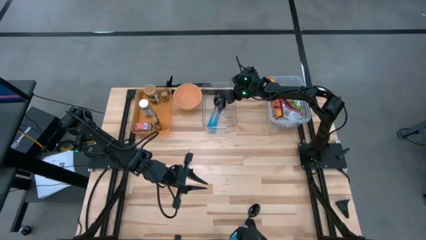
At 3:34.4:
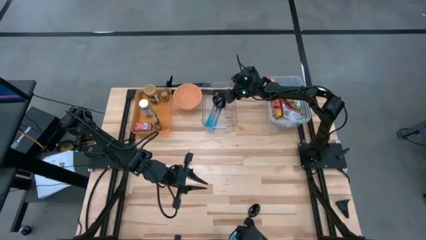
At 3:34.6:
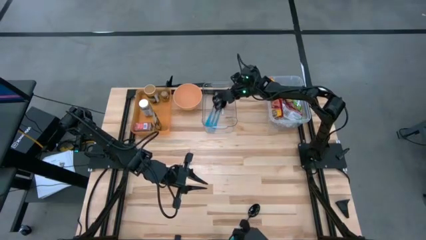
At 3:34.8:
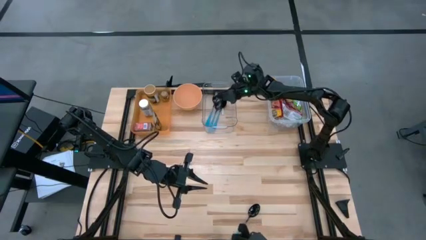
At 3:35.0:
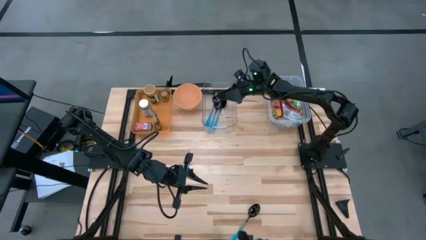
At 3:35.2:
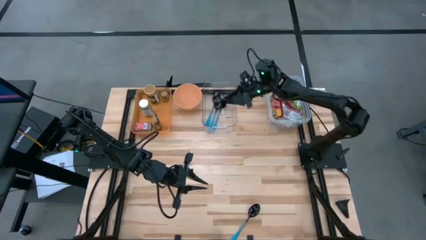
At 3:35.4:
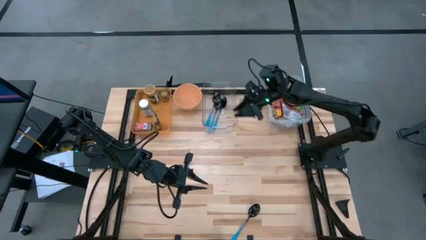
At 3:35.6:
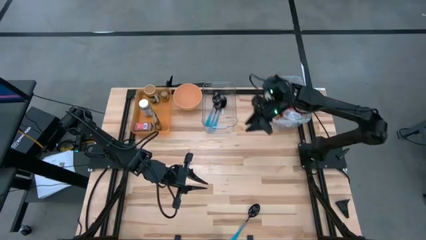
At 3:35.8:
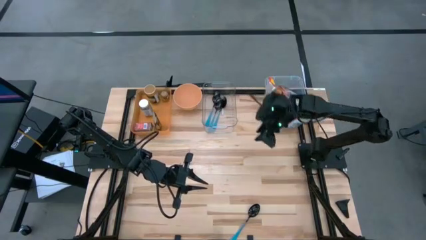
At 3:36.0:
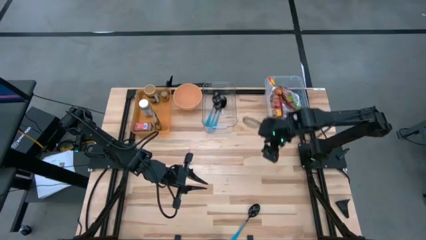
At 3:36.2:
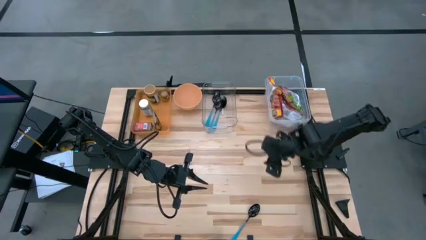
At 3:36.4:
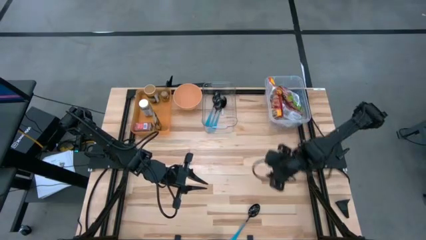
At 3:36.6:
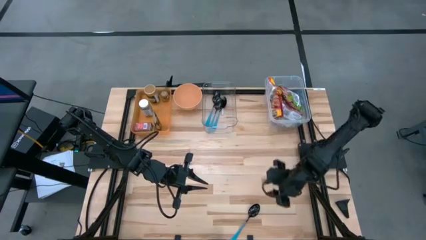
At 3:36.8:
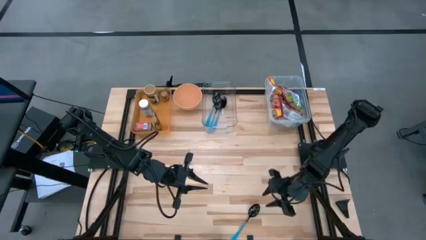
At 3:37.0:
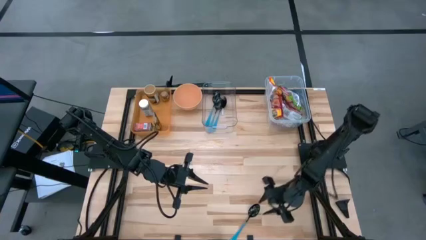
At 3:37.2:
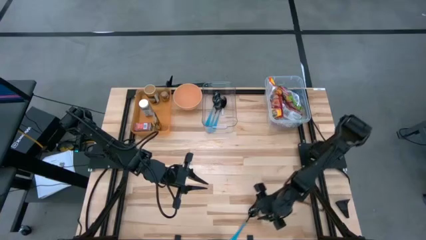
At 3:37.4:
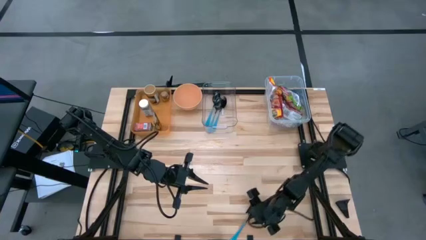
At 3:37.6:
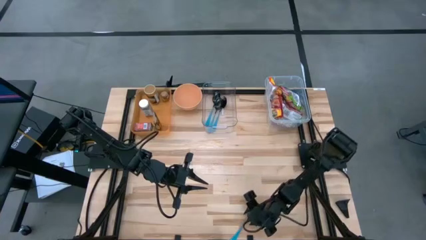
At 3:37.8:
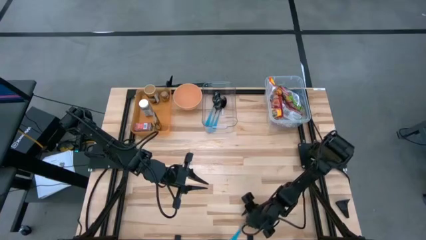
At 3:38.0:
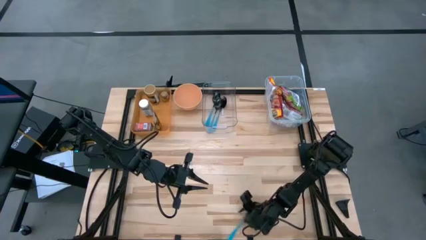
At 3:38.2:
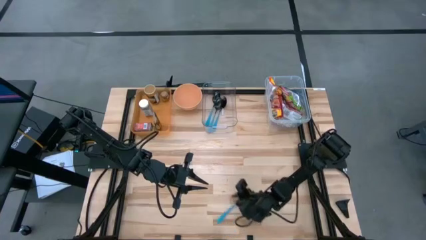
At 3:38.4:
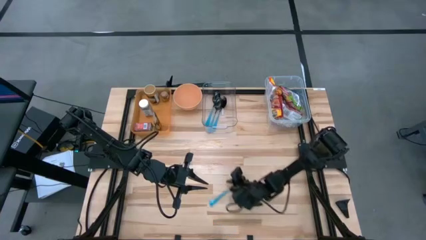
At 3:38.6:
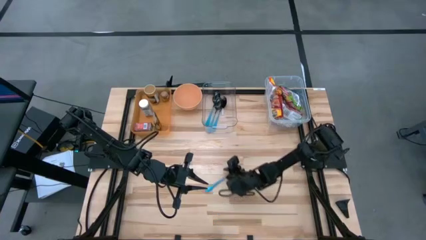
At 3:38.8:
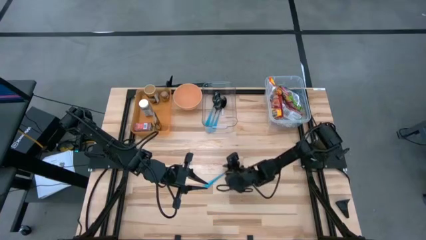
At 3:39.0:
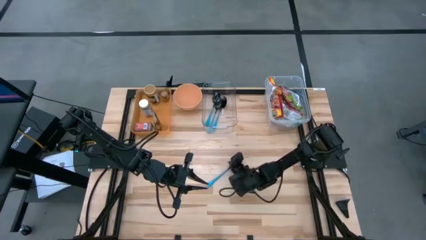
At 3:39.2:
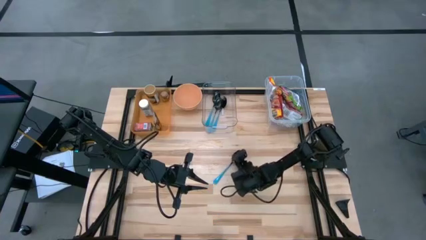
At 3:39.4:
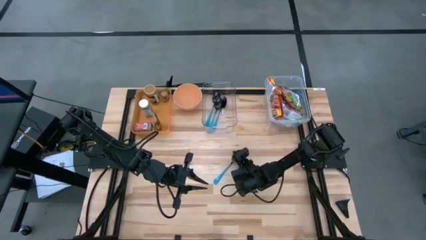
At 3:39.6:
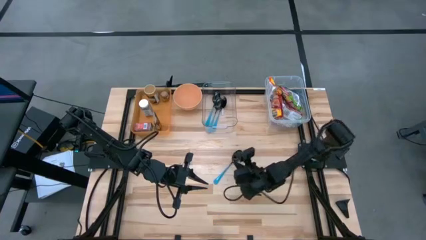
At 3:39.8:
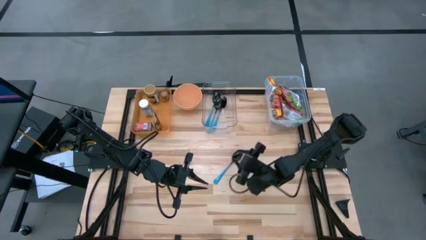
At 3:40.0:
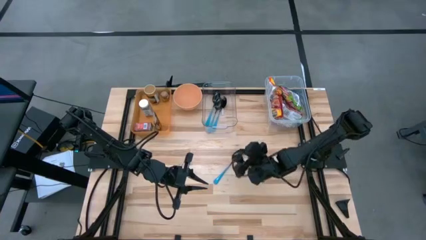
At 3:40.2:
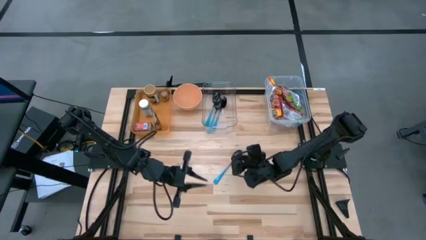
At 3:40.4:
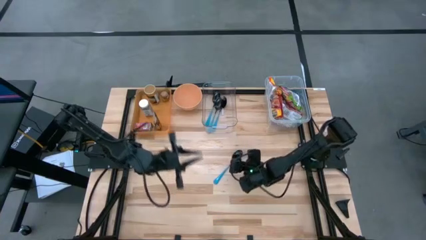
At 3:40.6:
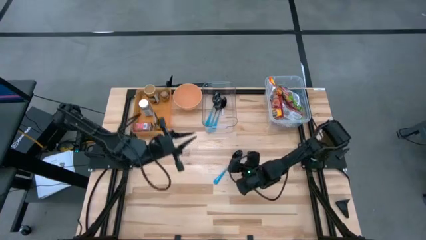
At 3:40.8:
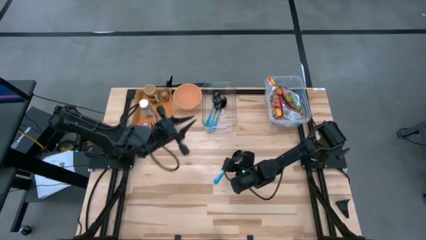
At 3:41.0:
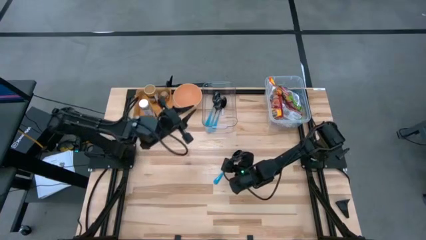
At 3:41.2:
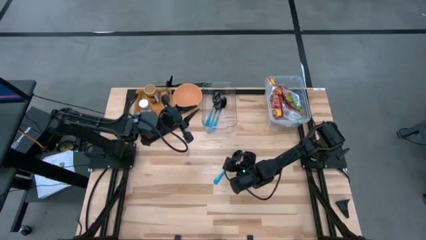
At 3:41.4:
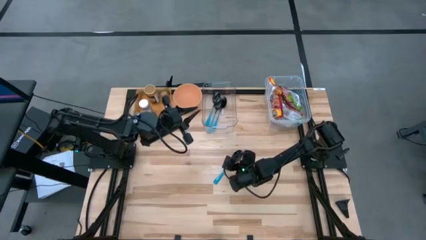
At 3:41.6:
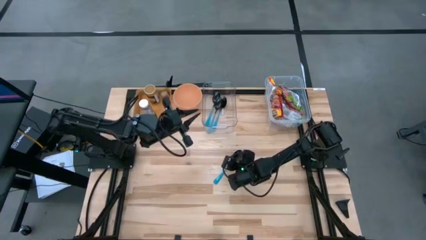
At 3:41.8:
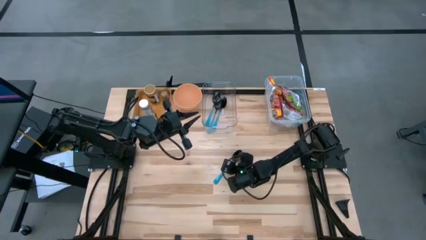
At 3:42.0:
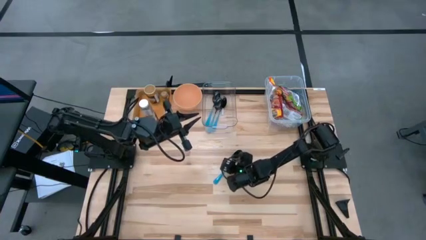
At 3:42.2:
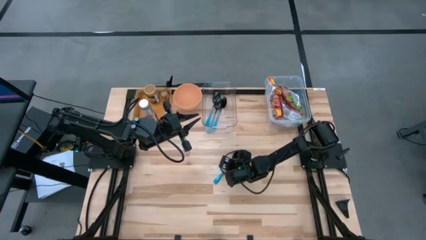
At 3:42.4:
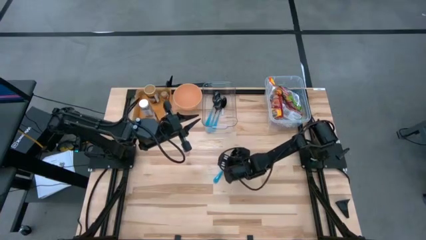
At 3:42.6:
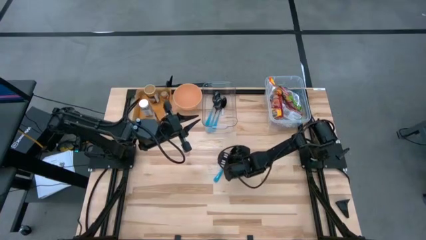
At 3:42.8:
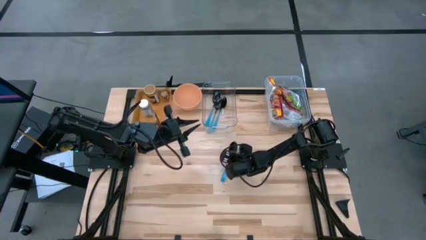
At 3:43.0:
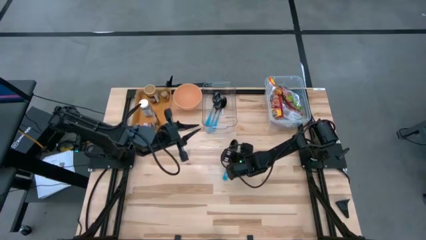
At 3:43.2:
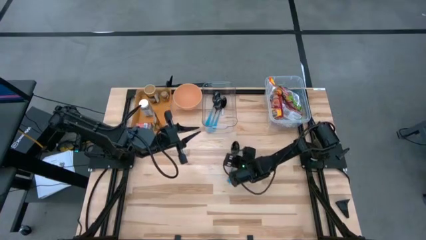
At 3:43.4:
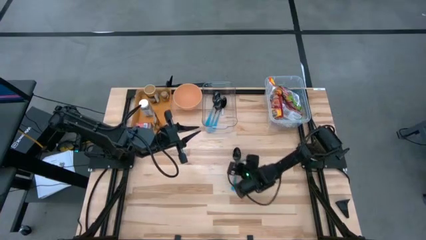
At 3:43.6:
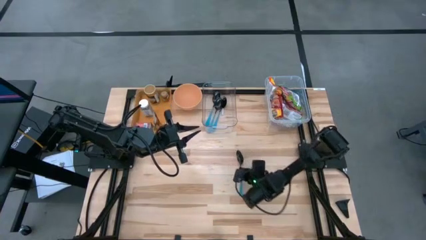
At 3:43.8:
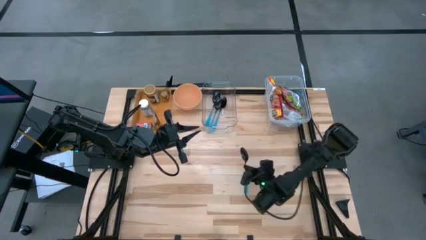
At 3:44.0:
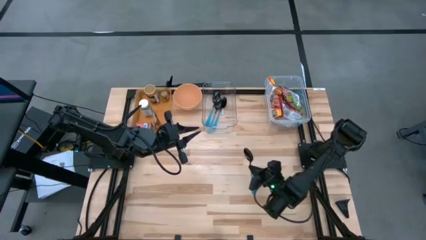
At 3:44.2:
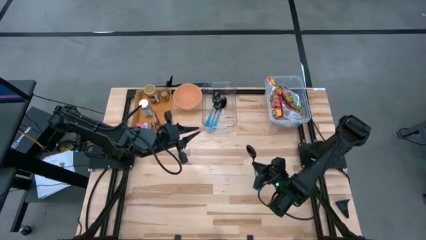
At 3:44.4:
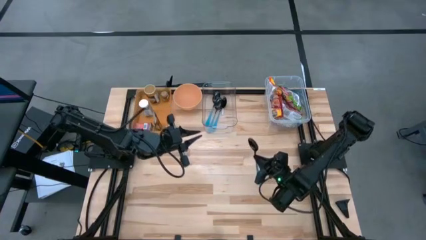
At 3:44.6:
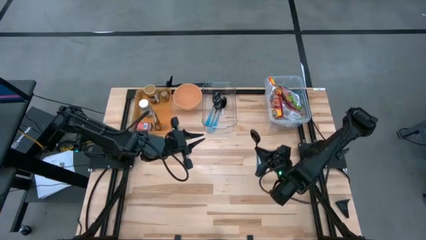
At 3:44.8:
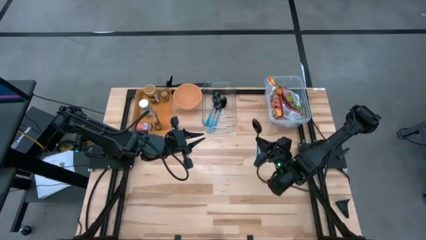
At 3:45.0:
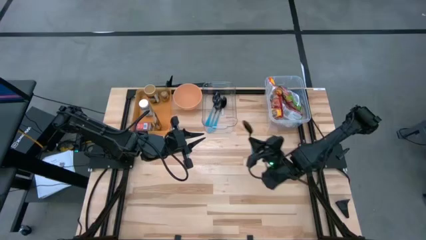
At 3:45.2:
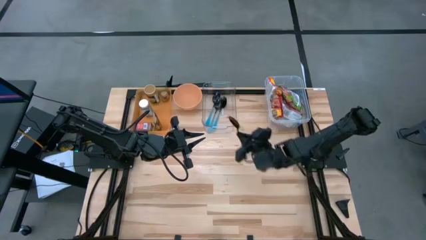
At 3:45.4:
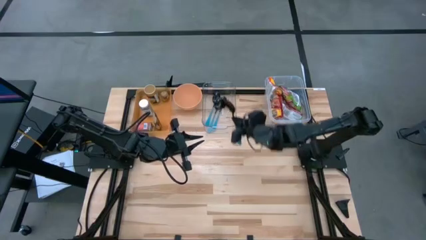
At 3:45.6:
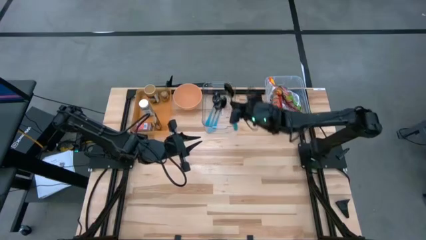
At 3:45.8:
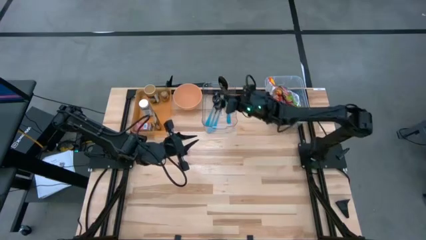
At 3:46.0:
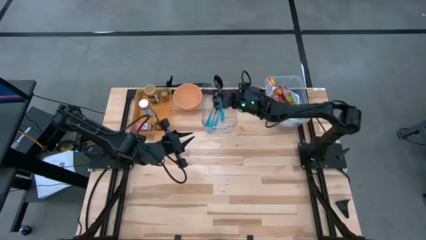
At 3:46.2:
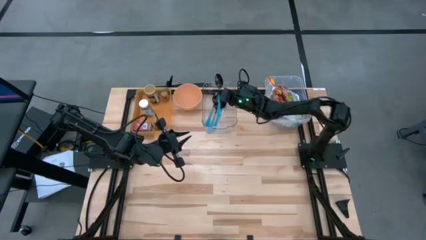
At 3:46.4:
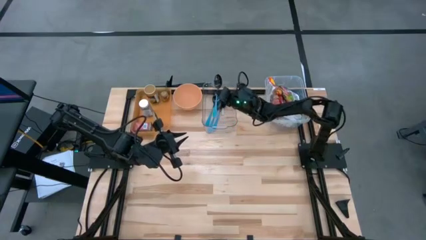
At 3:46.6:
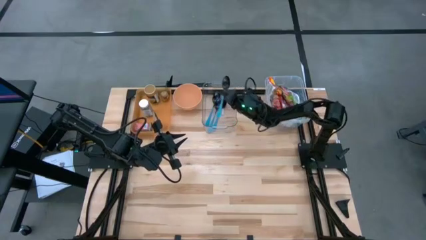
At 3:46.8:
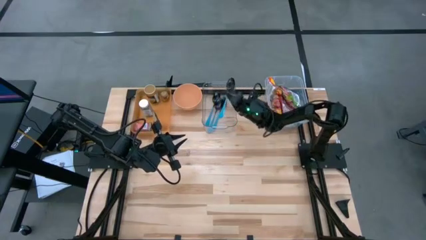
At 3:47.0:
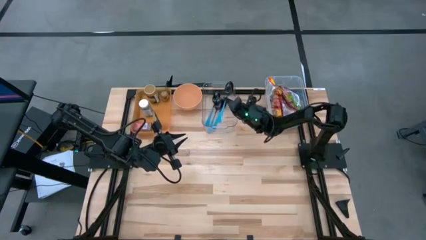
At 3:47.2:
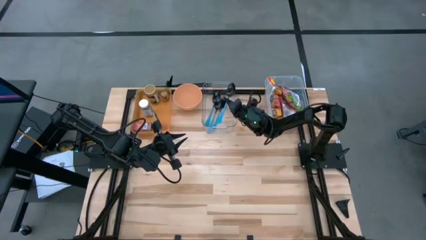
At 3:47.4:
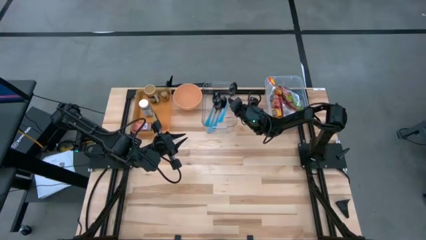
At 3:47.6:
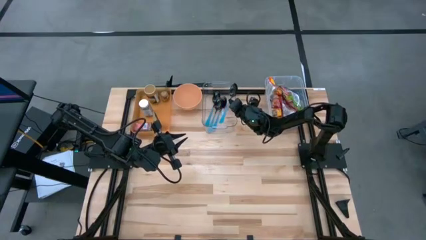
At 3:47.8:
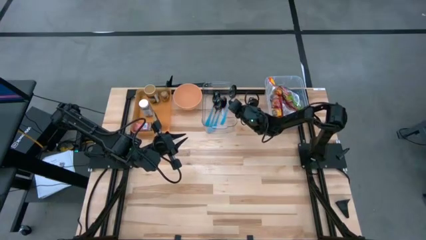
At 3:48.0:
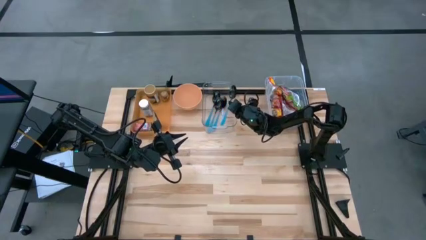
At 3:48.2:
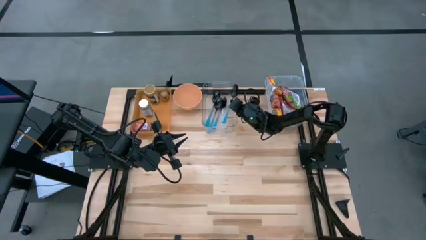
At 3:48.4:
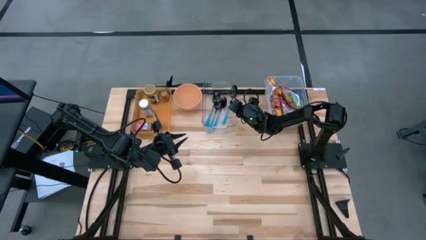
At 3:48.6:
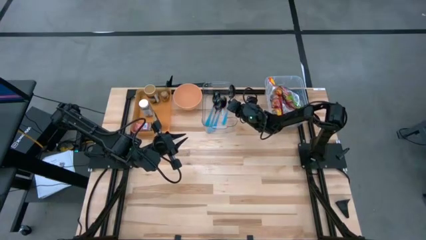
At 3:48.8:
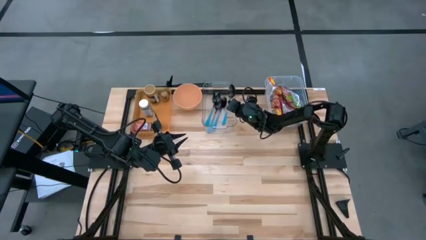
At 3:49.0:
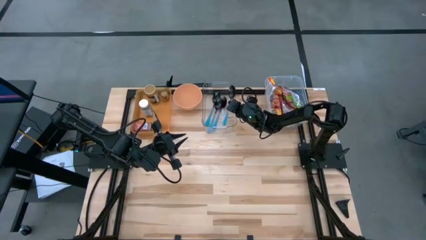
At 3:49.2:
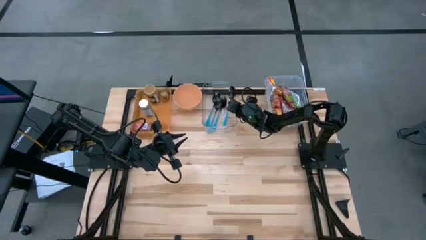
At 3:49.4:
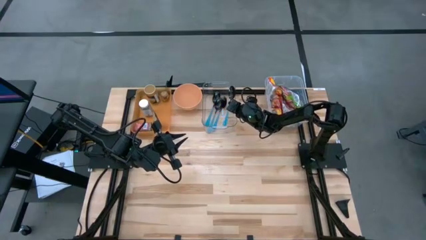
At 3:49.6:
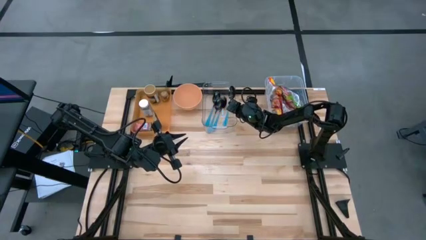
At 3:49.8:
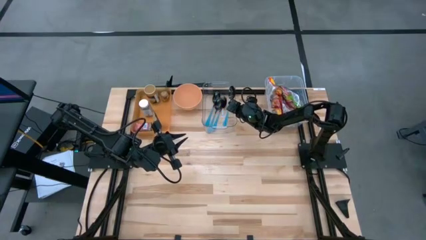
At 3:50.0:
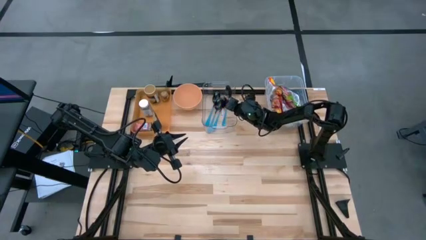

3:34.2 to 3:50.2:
Task: Pick & Place Food Item
Put the blue spoon into the transparent bin
